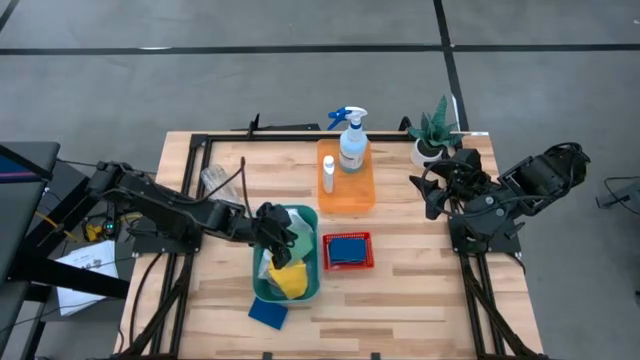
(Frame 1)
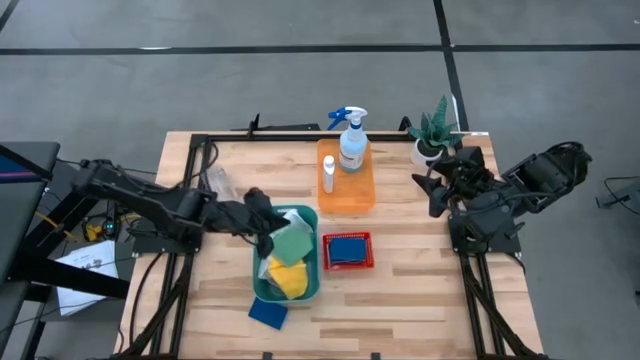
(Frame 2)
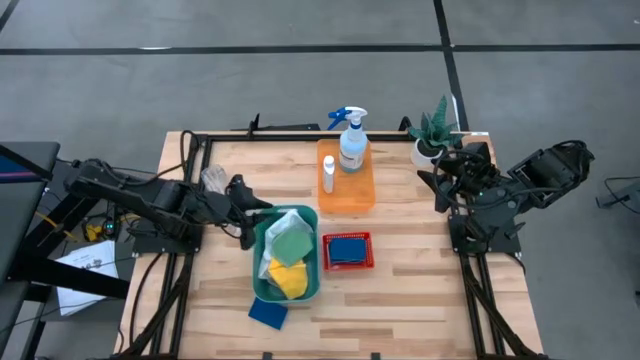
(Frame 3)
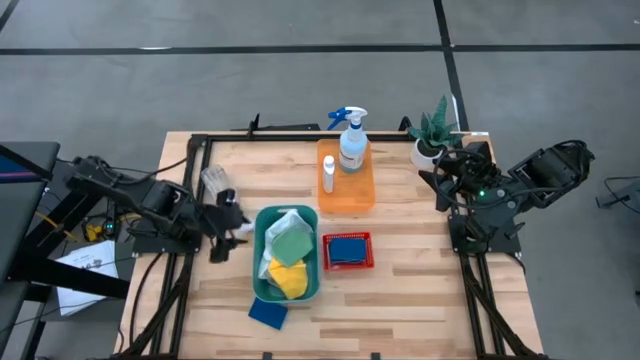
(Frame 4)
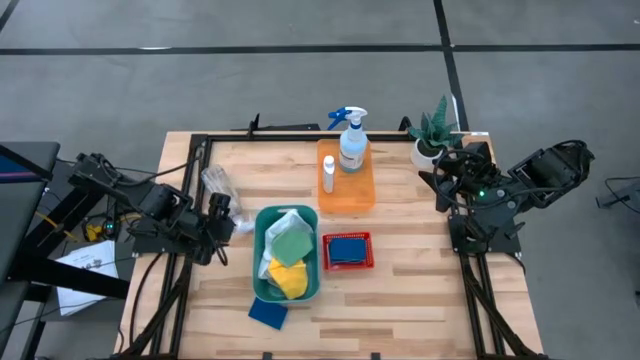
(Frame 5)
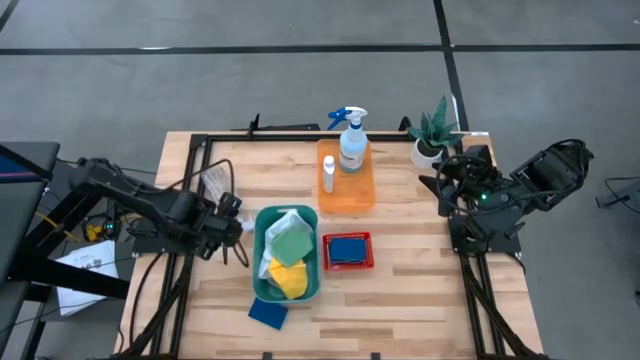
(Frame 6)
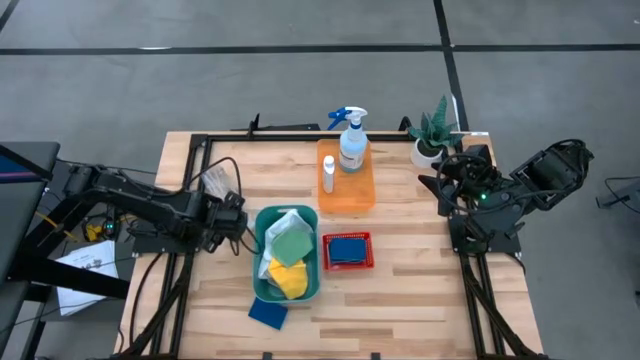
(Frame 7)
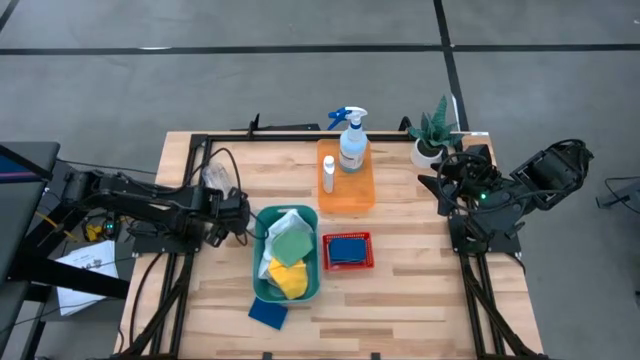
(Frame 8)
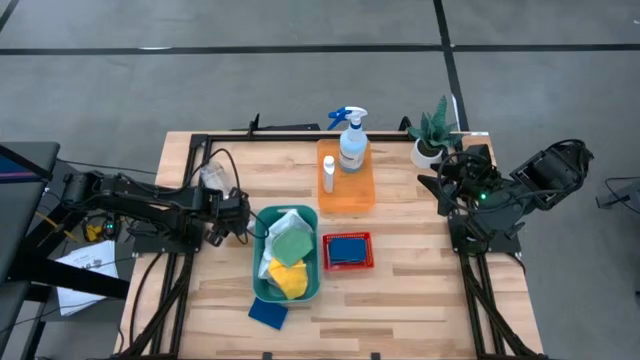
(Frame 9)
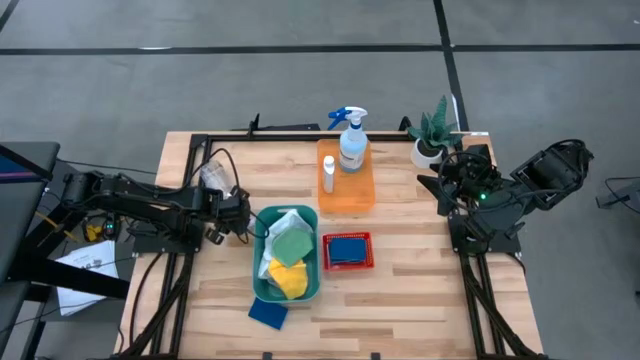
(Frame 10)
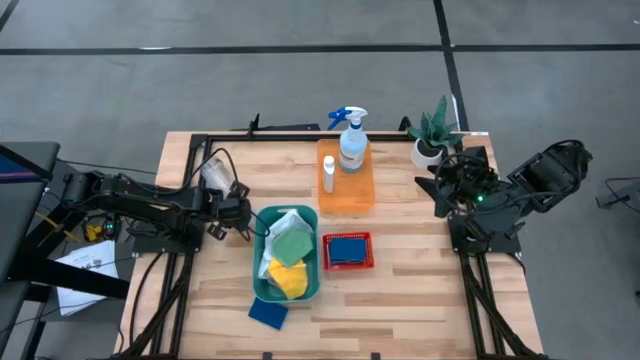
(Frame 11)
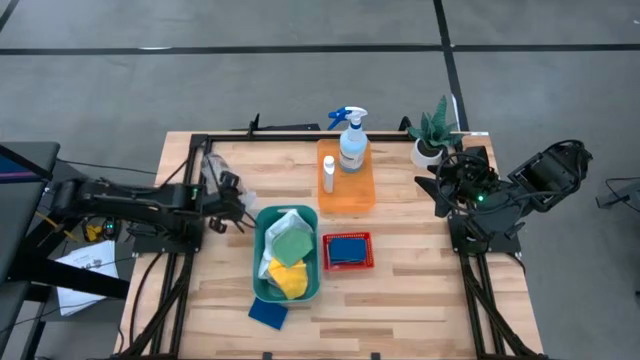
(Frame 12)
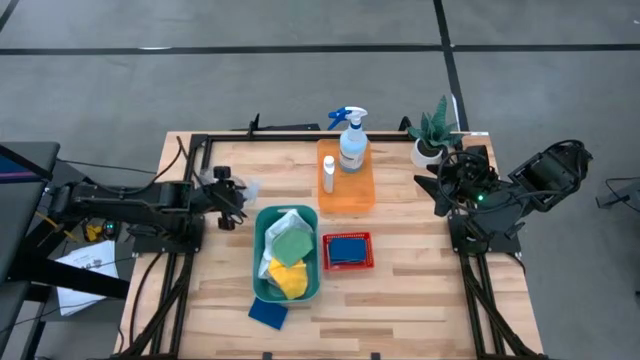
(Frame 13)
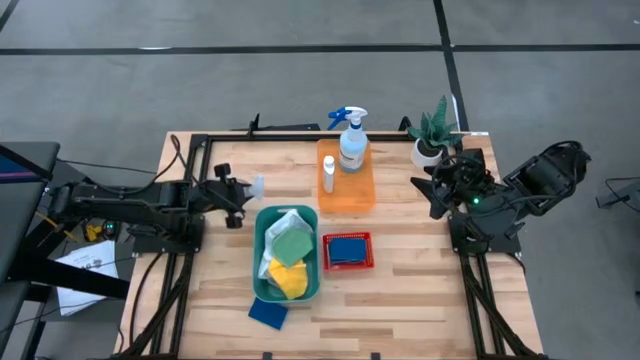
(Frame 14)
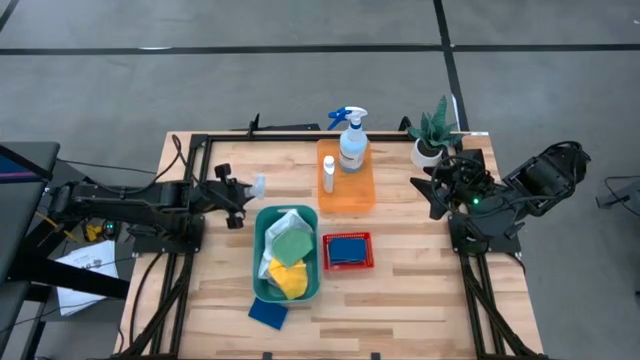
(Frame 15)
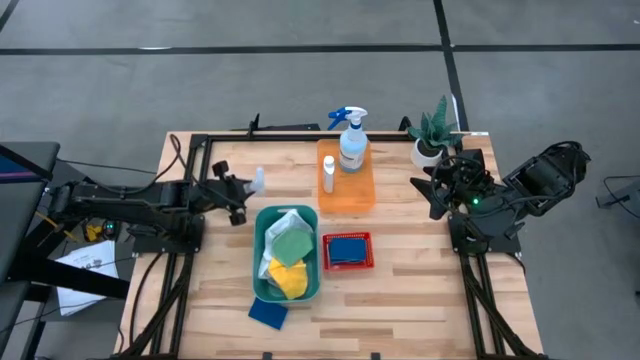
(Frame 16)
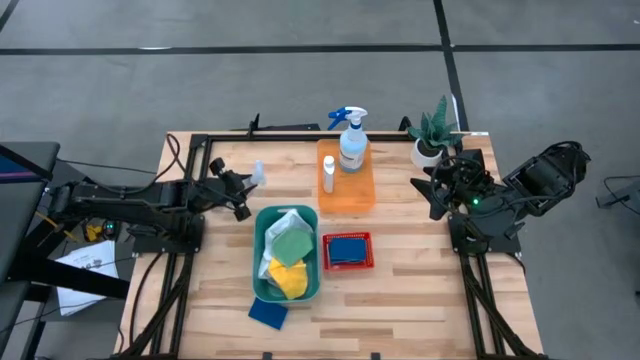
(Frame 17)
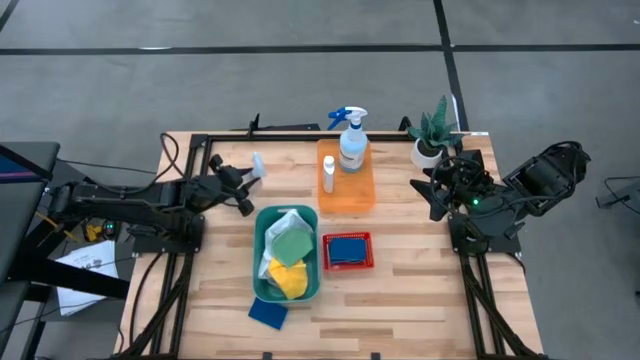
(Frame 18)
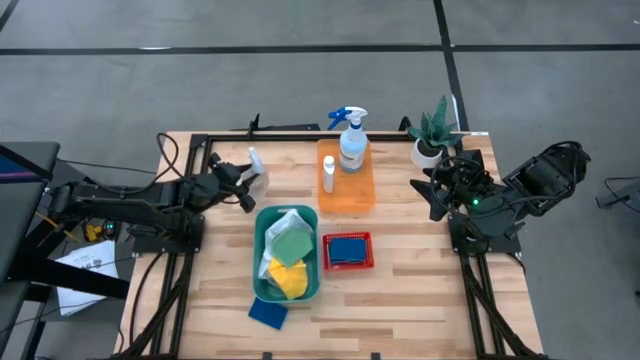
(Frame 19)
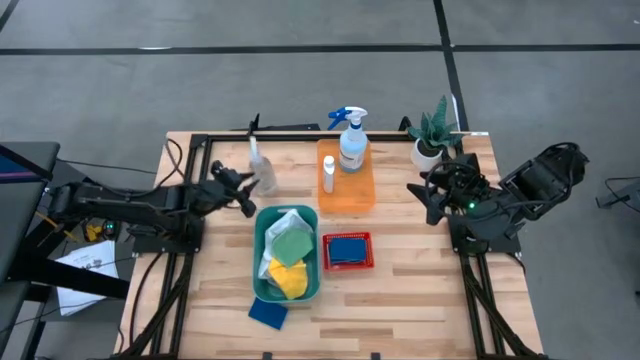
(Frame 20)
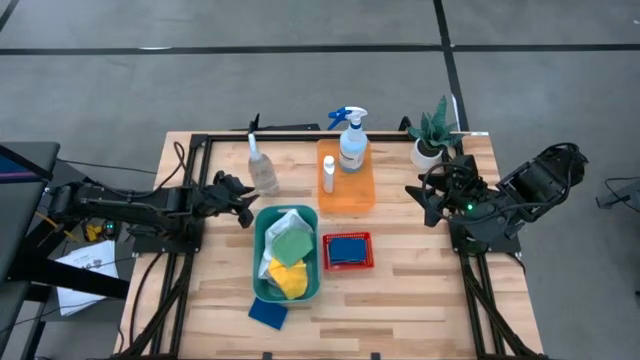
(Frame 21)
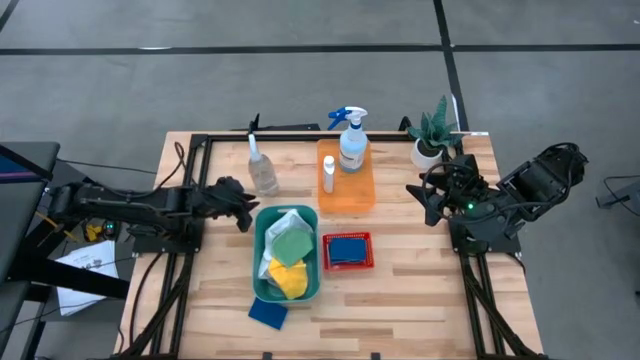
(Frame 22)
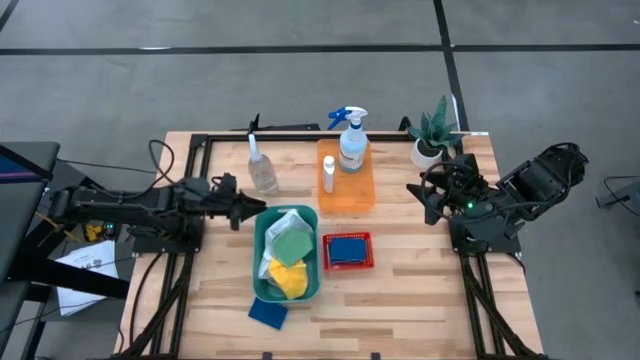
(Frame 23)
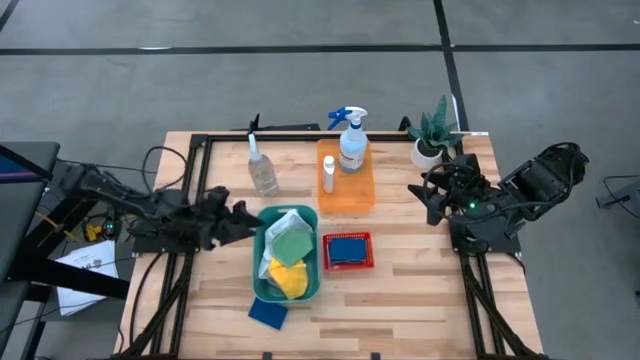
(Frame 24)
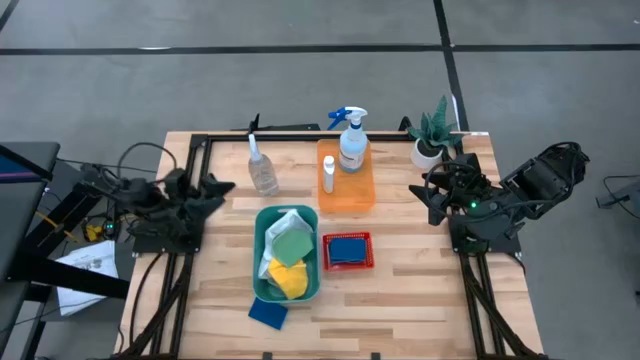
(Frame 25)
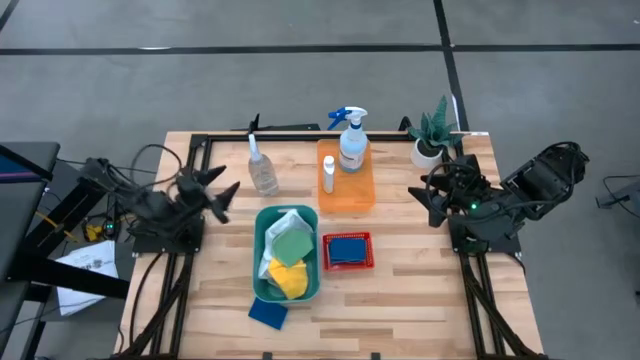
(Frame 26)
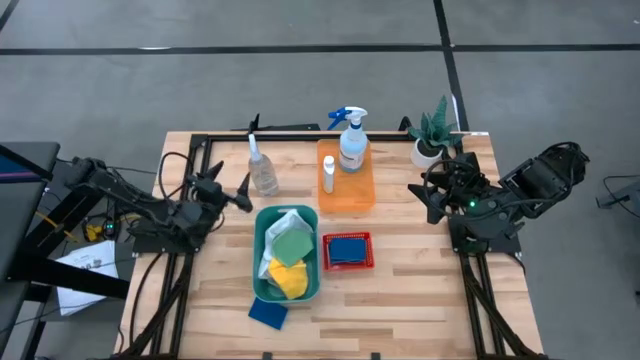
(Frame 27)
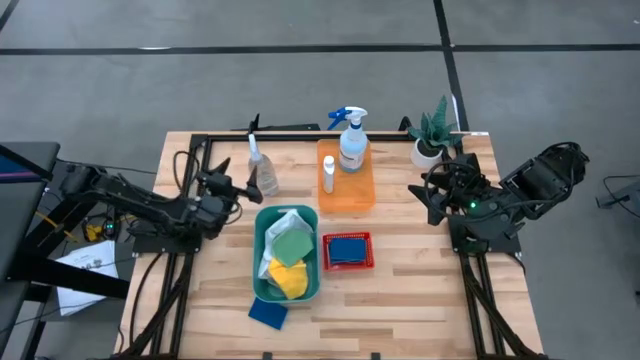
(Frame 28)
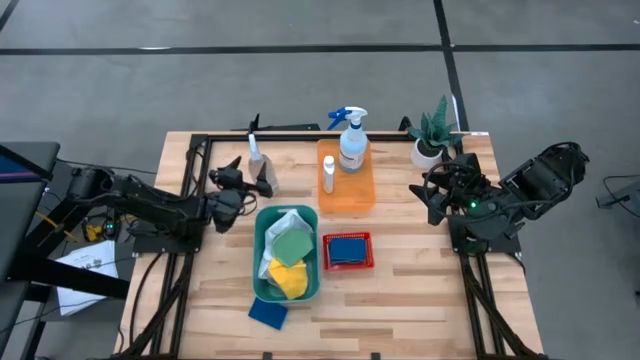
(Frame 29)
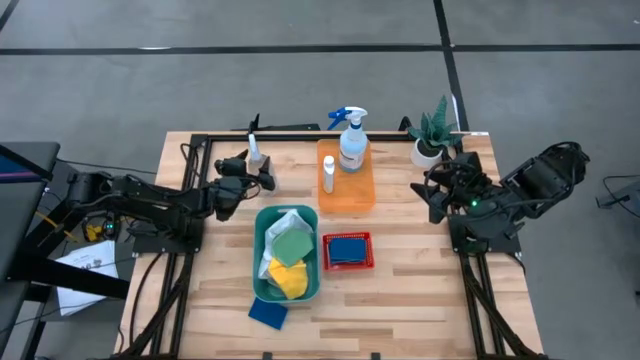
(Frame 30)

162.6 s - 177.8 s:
Task: Pick & Place Kitchen Items
Put the transparent spray bottle into the orange bin

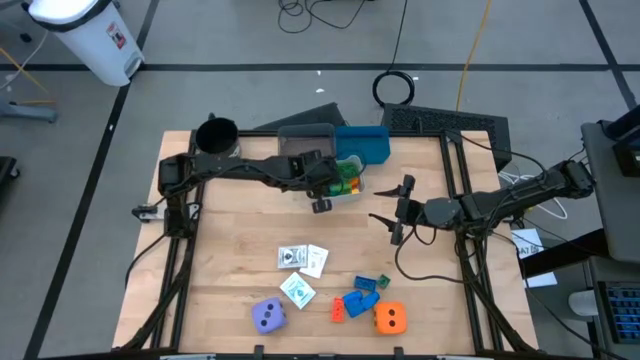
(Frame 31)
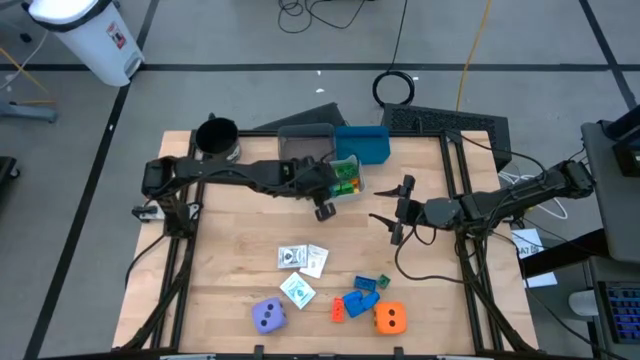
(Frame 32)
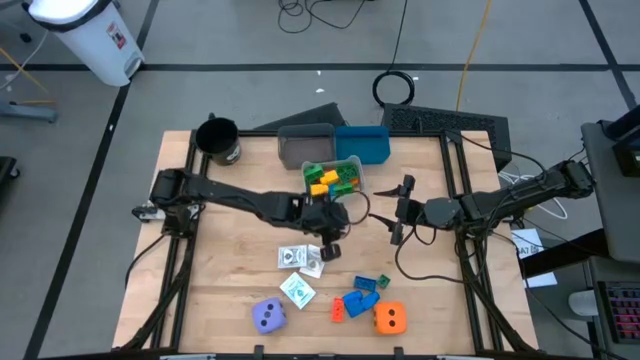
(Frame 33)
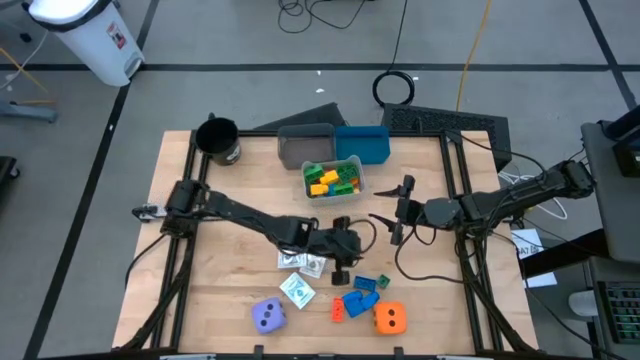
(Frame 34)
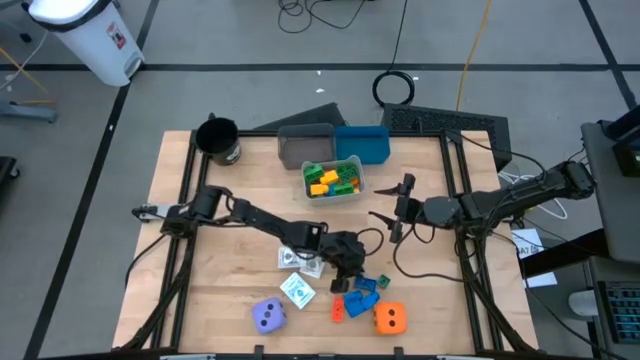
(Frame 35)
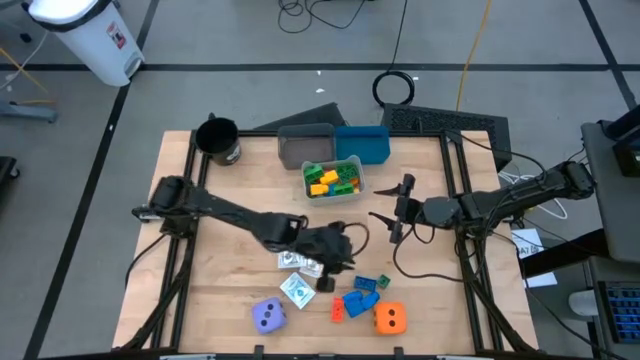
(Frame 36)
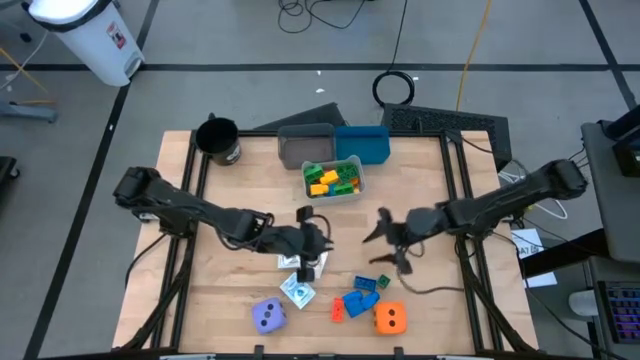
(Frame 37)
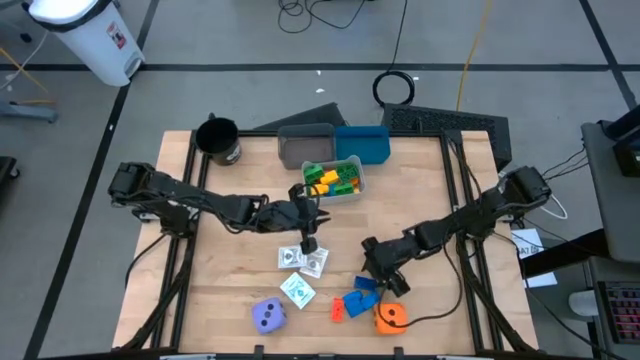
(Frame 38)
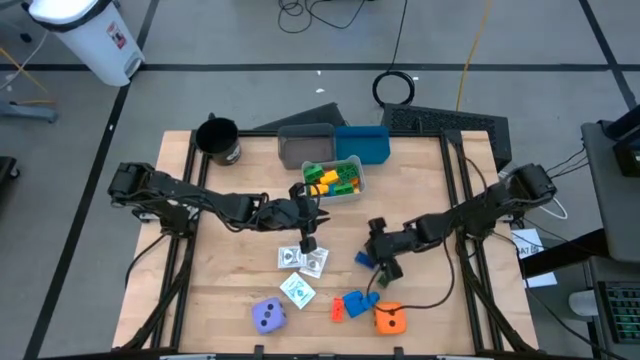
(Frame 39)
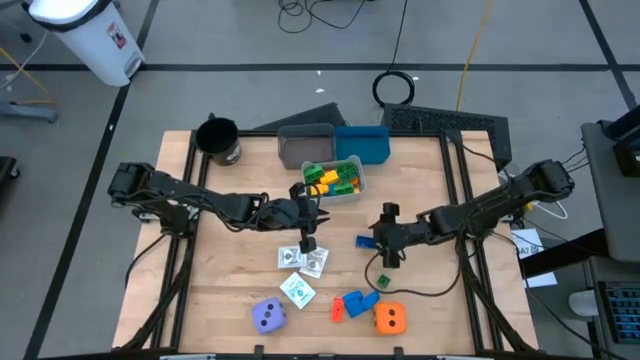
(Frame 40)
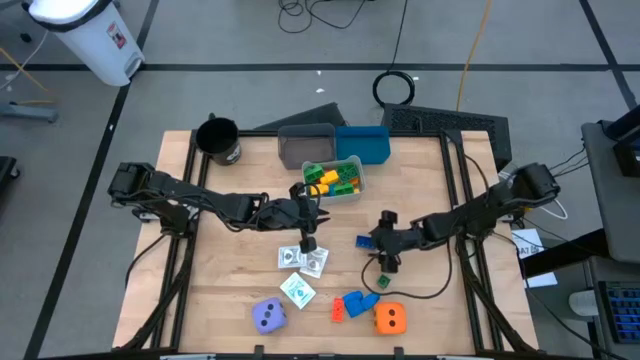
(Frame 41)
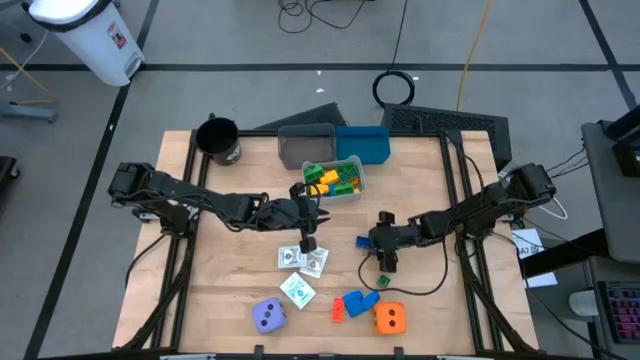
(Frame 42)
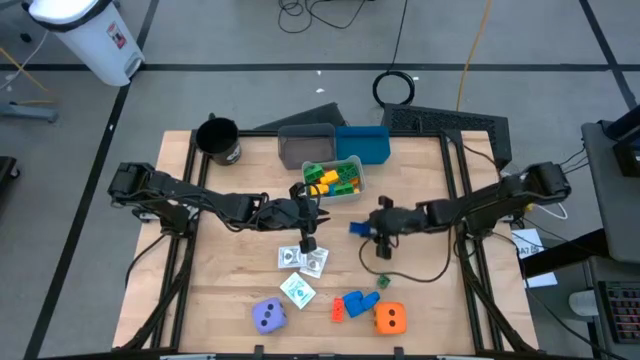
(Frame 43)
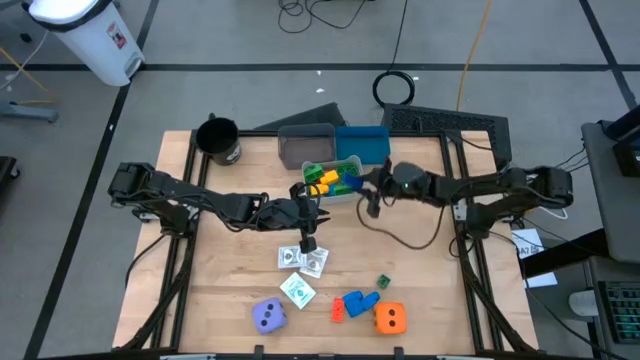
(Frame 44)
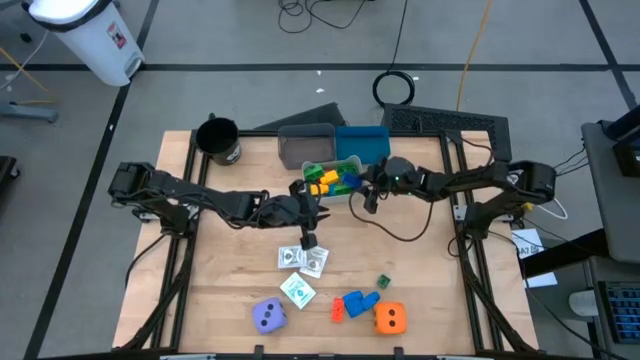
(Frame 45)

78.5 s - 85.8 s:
Task: Pick & Place Toys
Put the blue game piece into the gray bin
